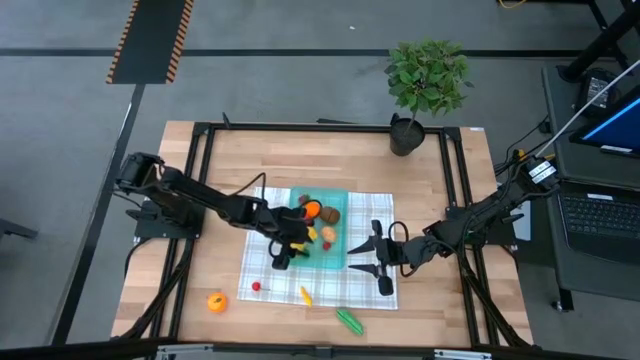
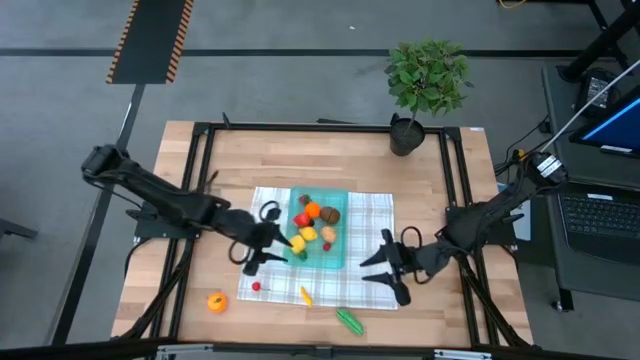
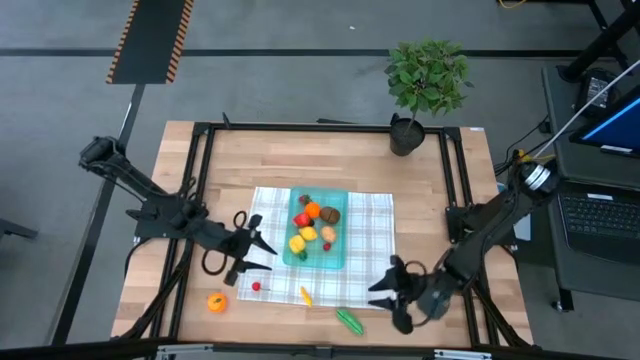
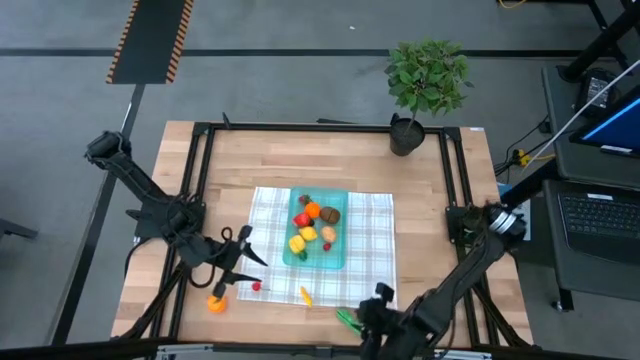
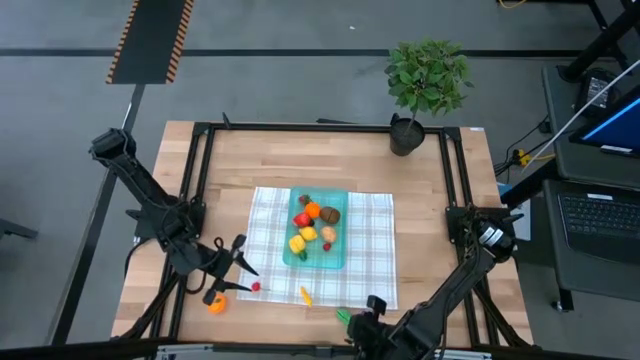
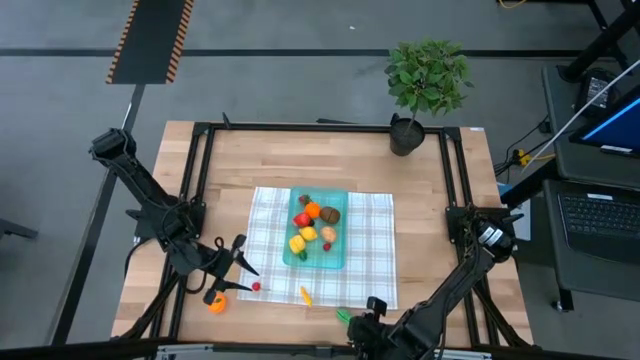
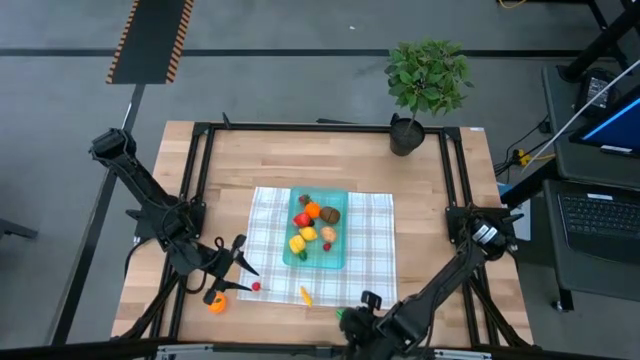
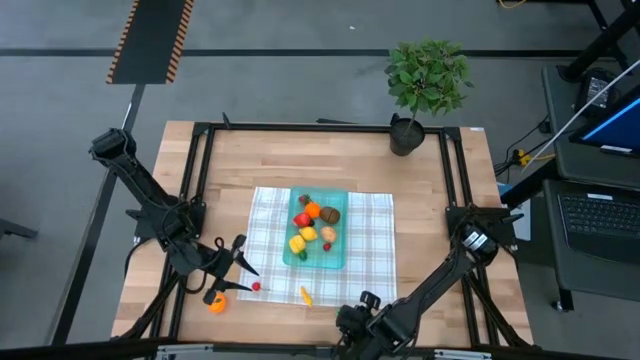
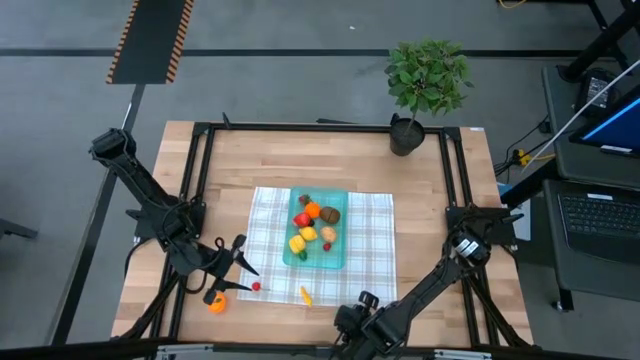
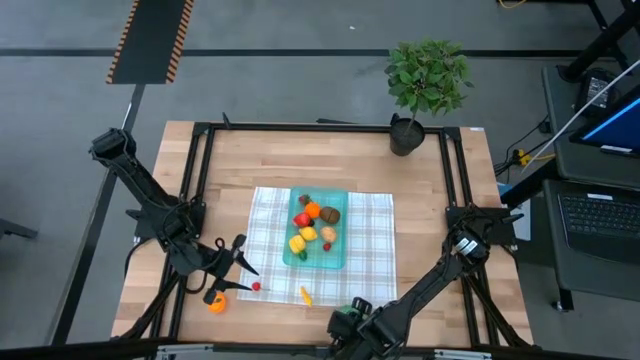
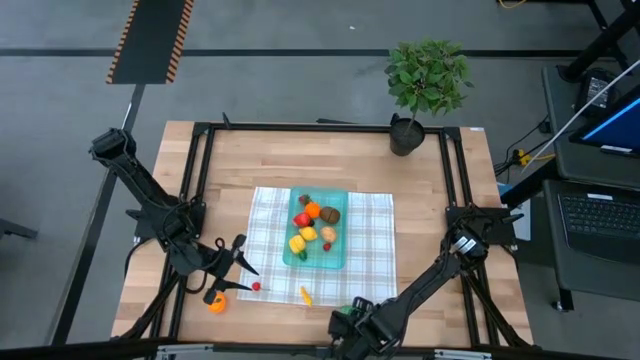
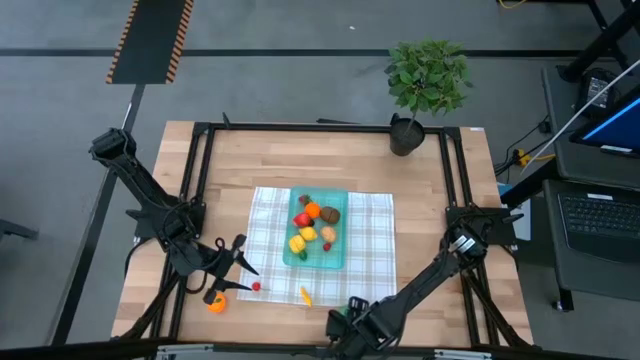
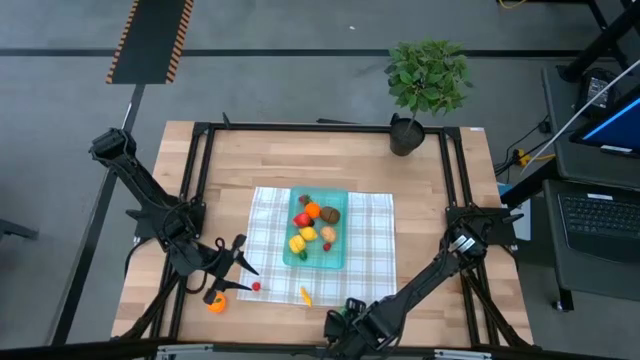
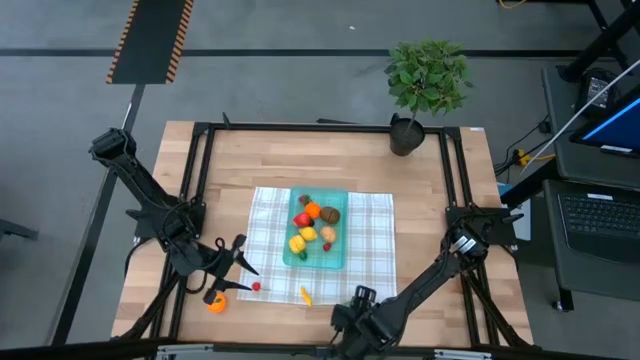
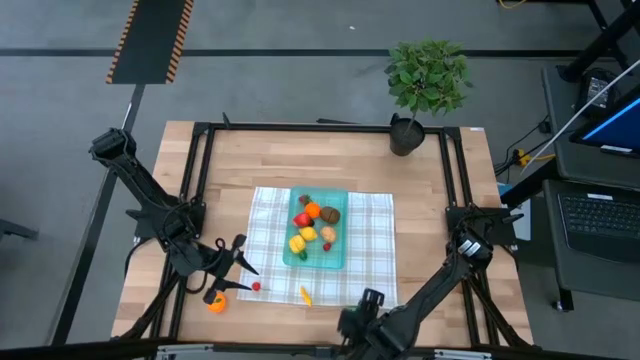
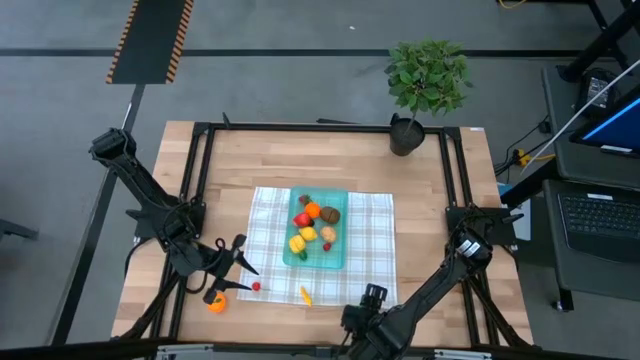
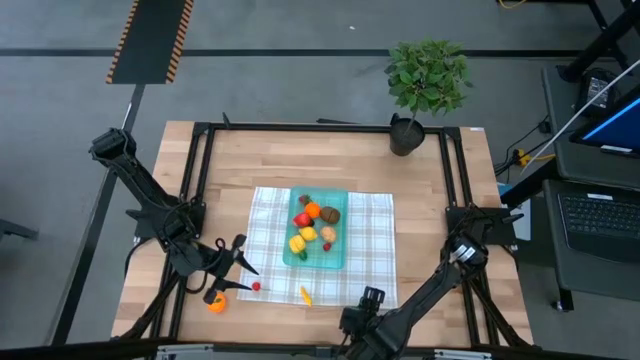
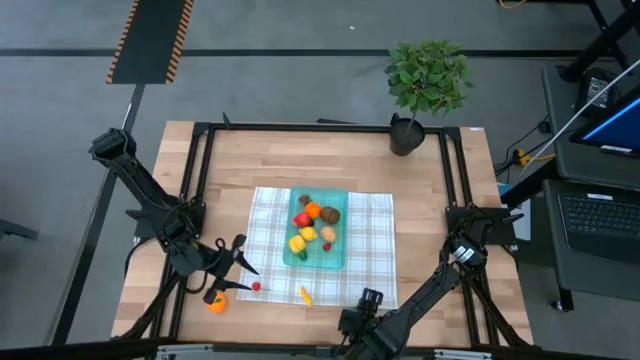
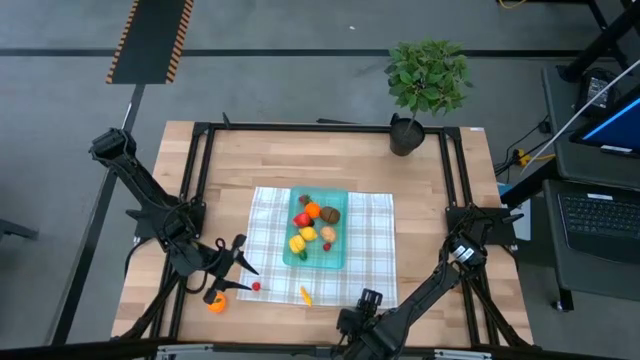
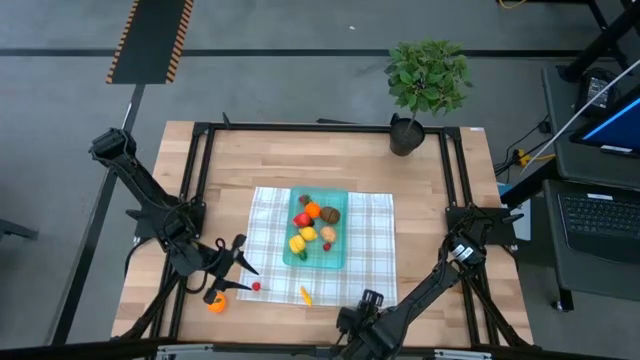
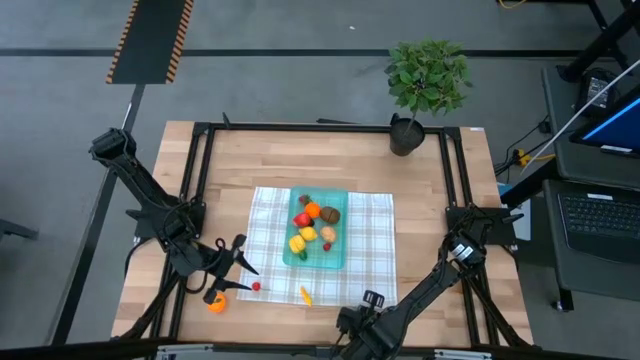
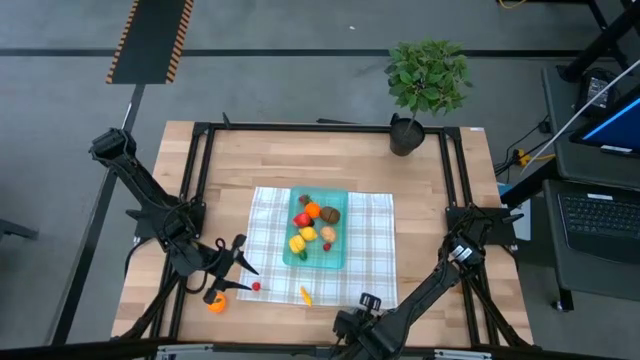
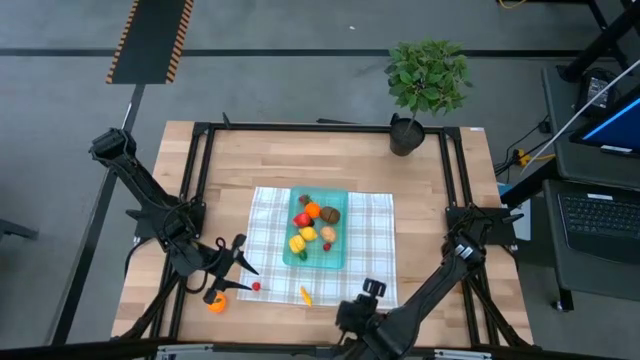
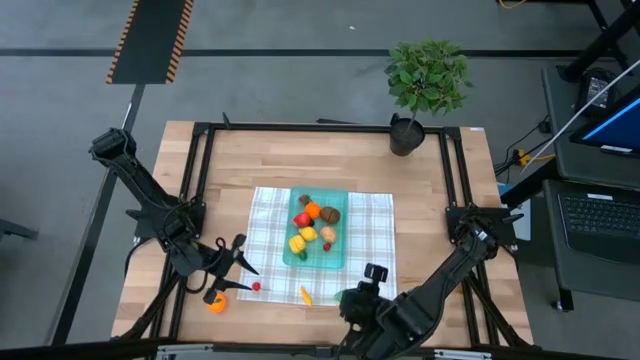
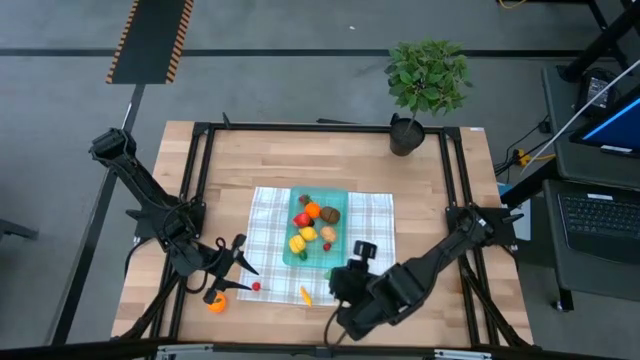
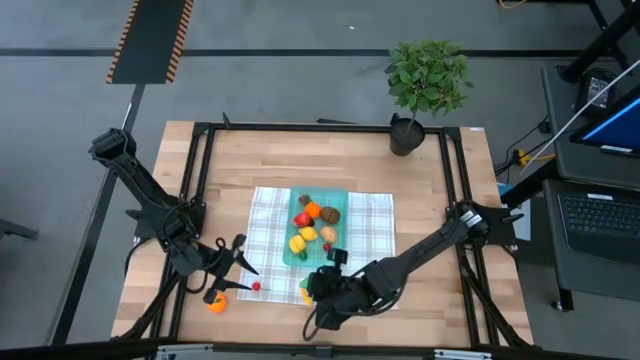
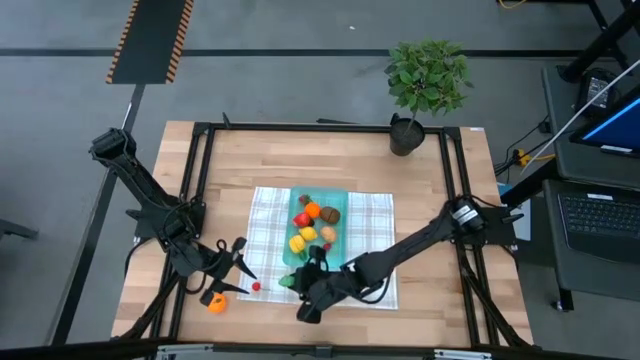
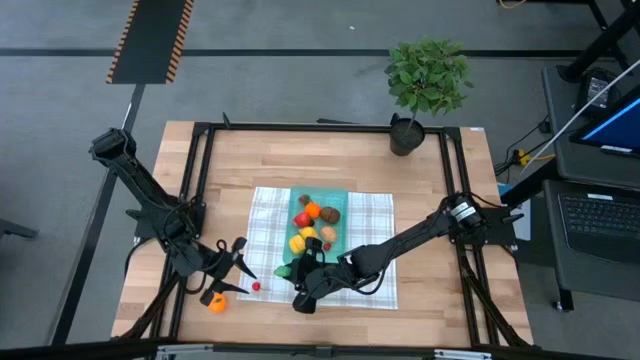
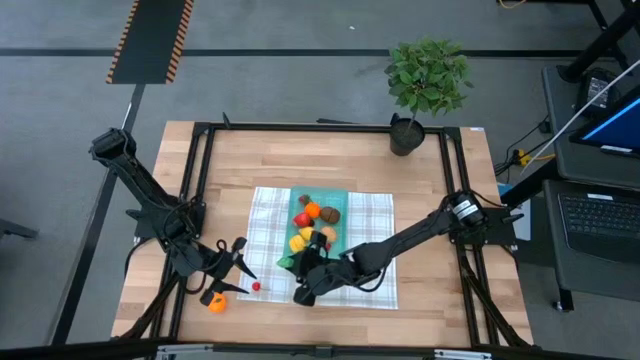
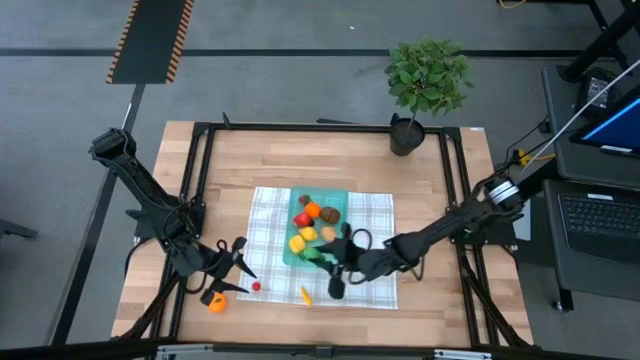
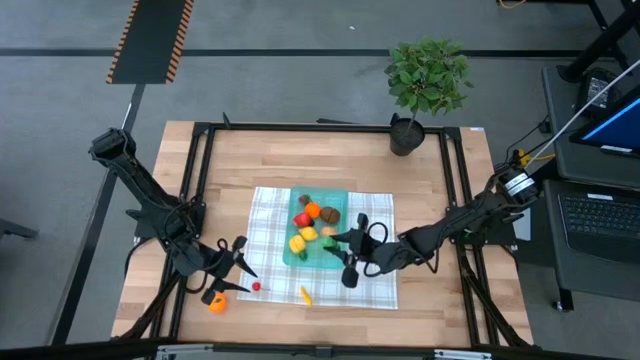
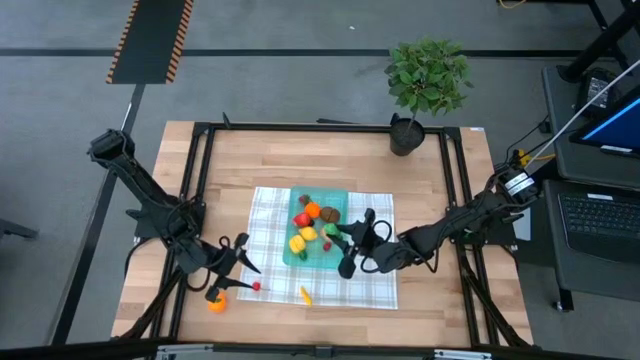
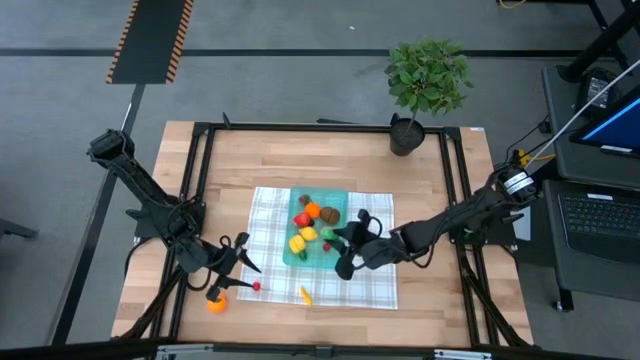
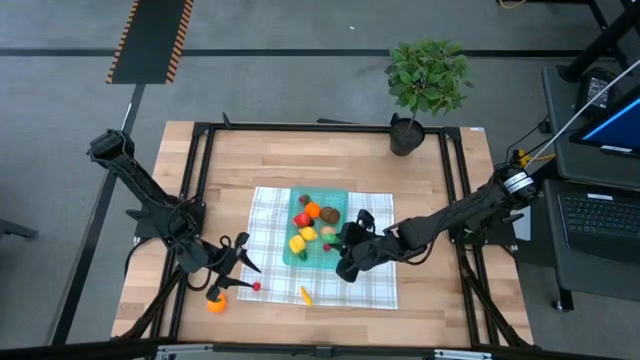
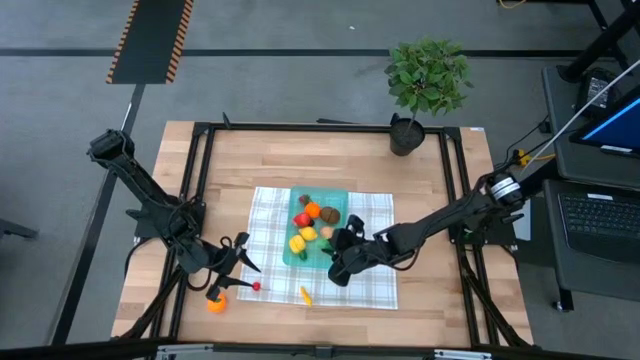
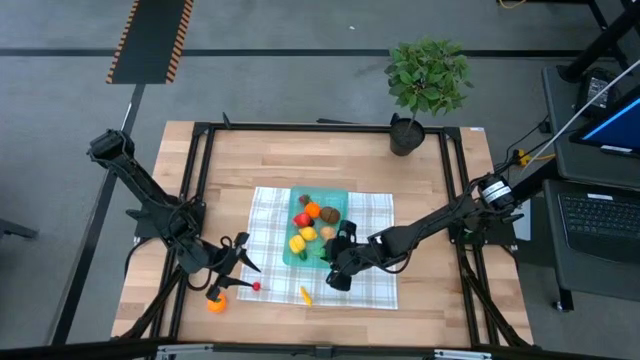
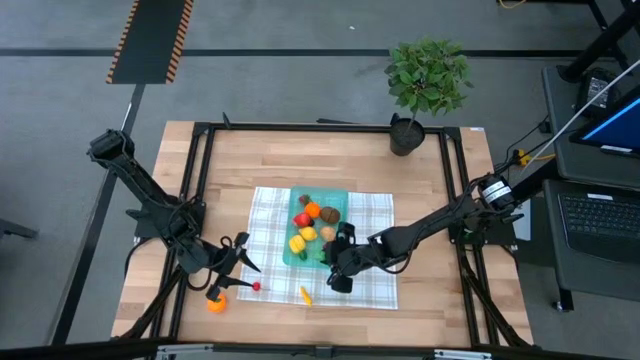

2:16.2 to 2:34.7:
Task: Pick and placing Produce into tupperware
Put the green pea into the blue bin
